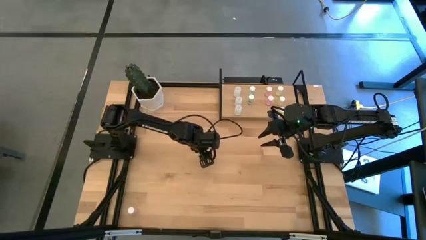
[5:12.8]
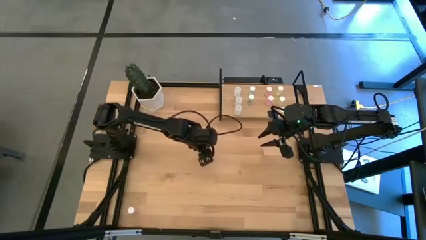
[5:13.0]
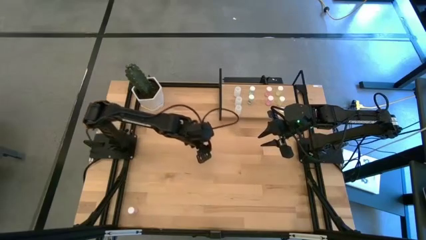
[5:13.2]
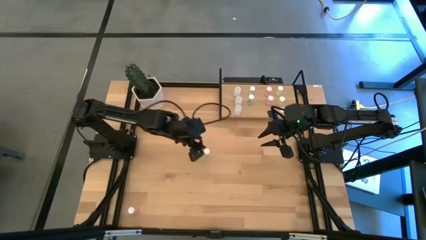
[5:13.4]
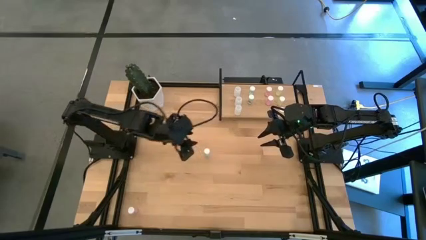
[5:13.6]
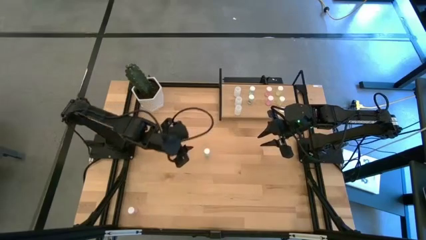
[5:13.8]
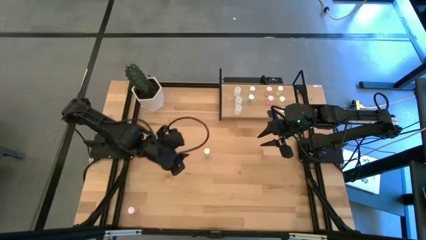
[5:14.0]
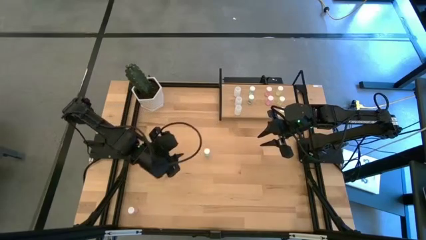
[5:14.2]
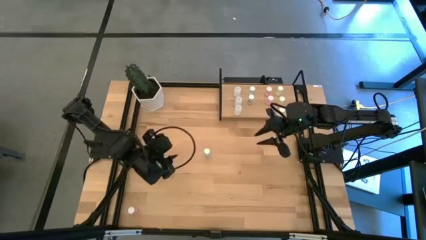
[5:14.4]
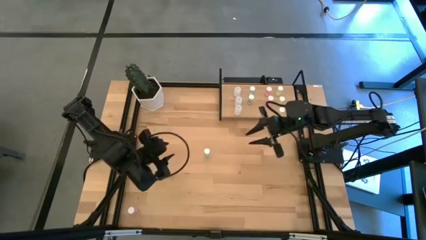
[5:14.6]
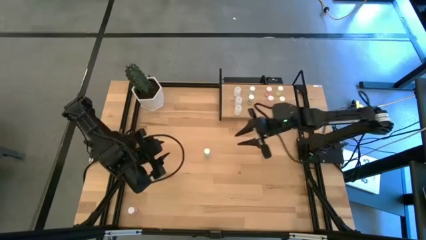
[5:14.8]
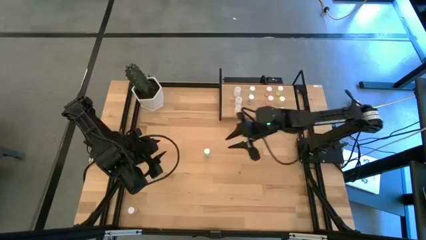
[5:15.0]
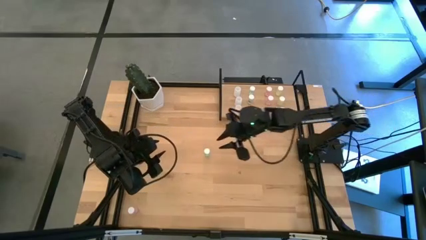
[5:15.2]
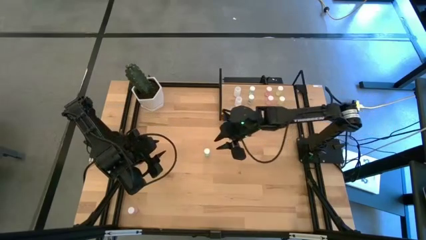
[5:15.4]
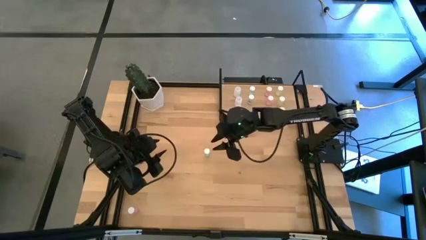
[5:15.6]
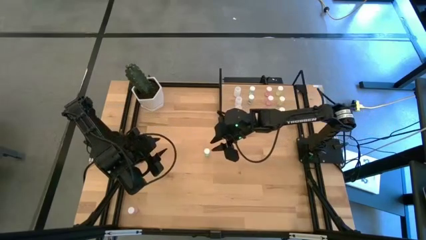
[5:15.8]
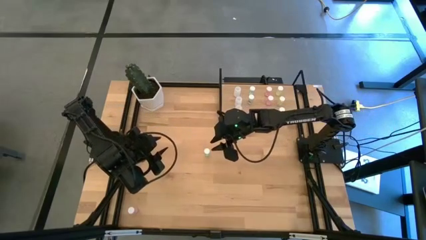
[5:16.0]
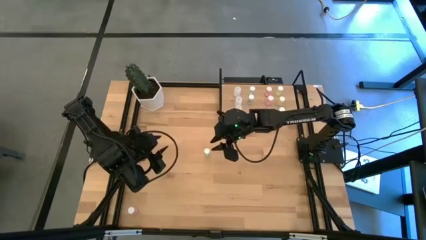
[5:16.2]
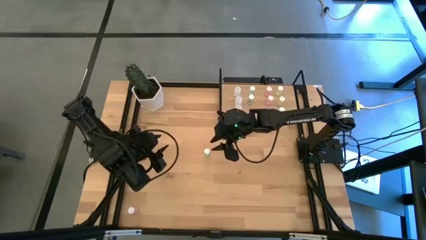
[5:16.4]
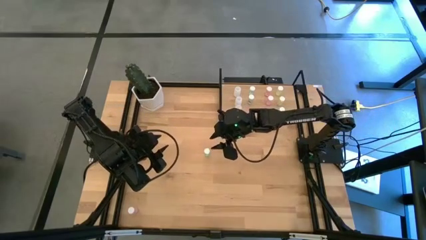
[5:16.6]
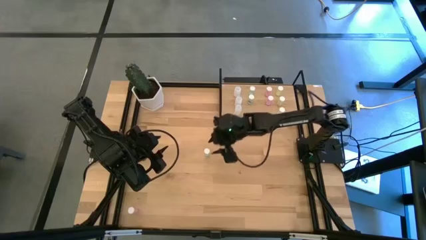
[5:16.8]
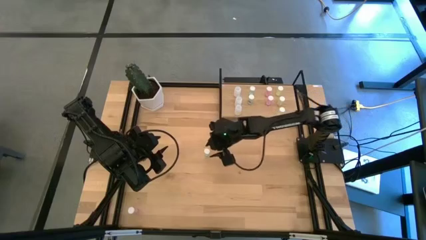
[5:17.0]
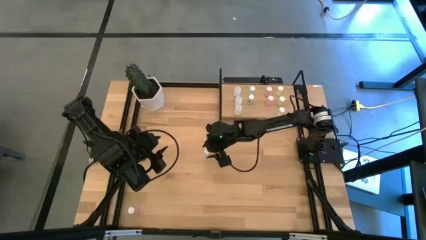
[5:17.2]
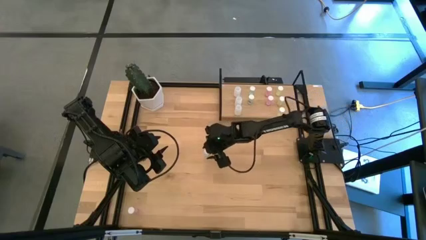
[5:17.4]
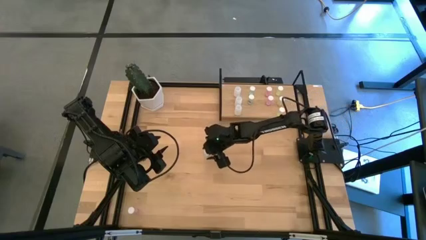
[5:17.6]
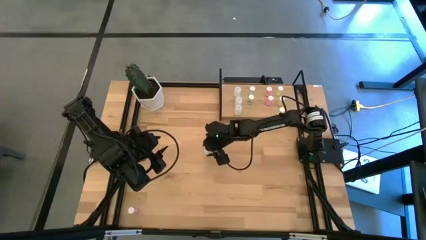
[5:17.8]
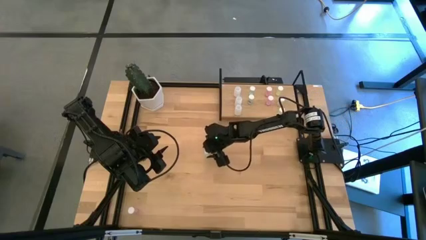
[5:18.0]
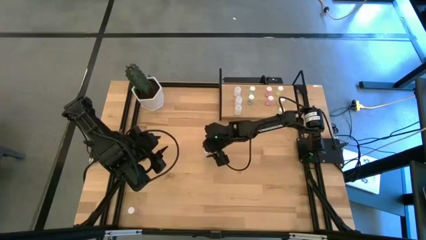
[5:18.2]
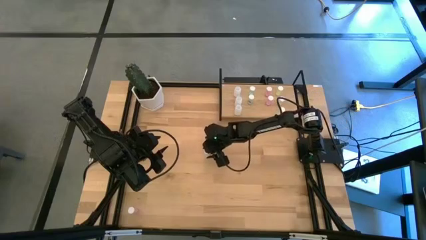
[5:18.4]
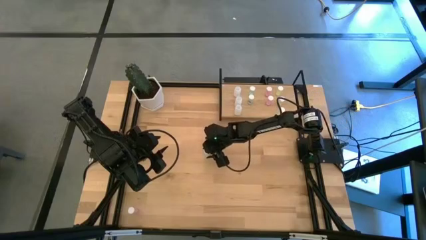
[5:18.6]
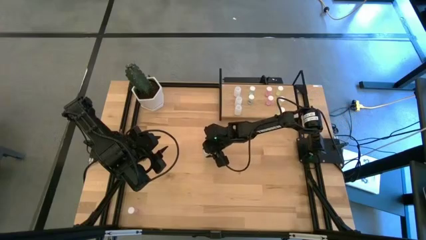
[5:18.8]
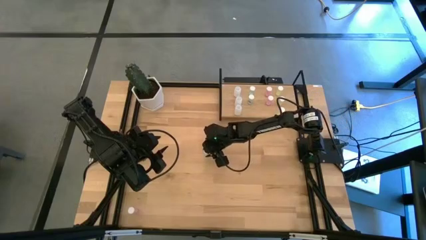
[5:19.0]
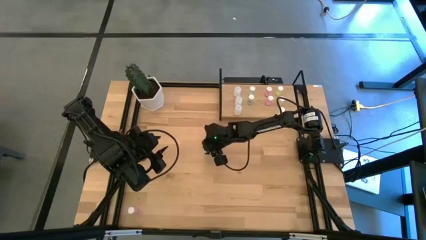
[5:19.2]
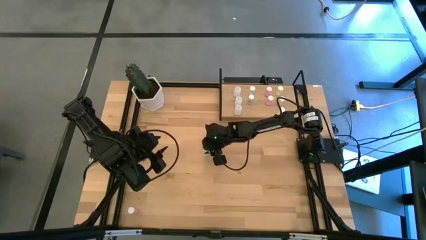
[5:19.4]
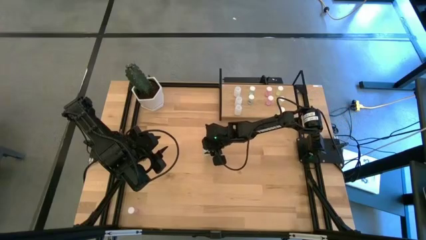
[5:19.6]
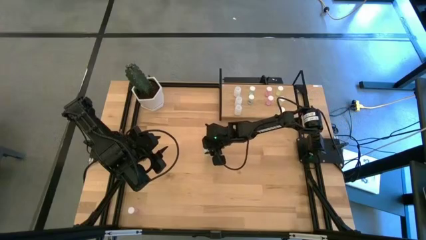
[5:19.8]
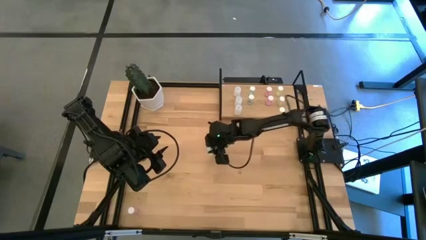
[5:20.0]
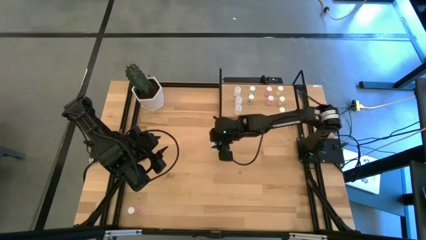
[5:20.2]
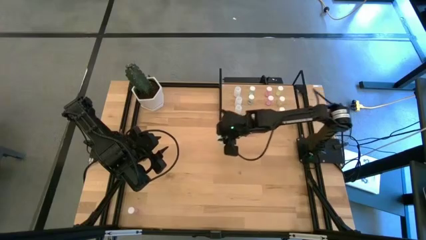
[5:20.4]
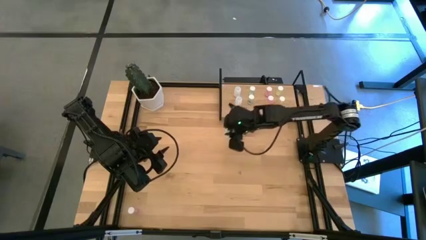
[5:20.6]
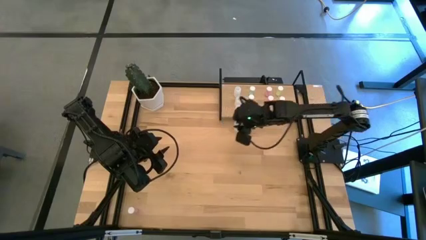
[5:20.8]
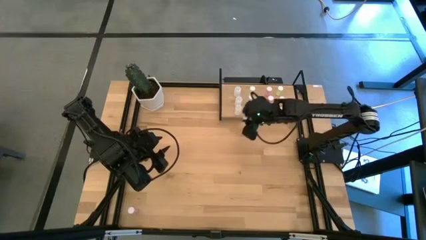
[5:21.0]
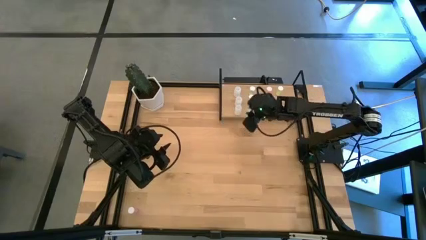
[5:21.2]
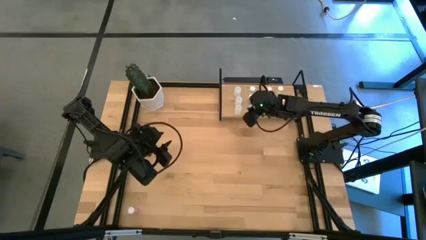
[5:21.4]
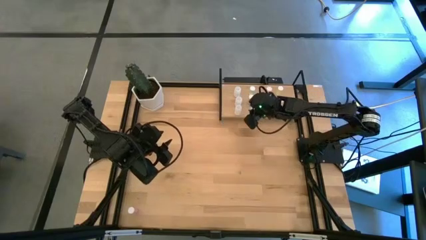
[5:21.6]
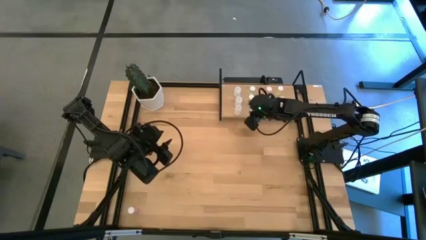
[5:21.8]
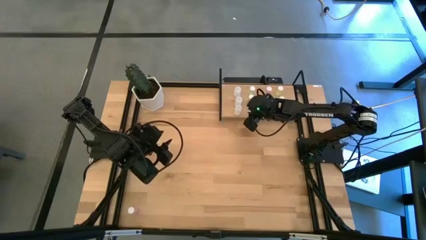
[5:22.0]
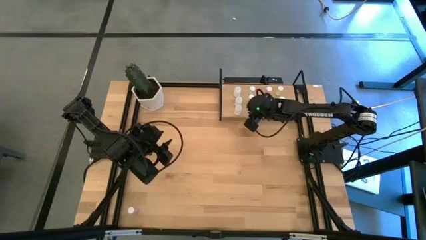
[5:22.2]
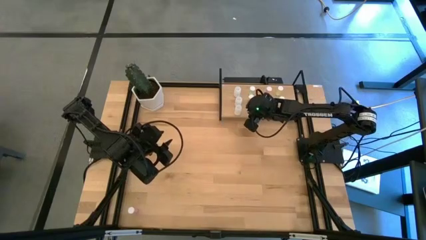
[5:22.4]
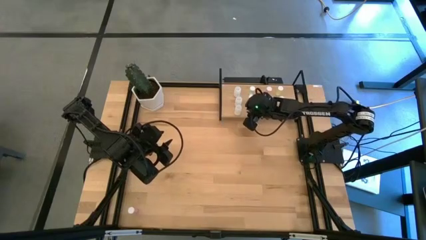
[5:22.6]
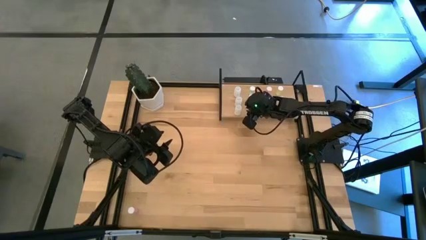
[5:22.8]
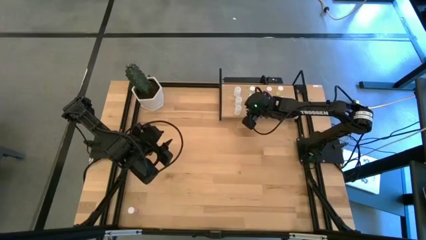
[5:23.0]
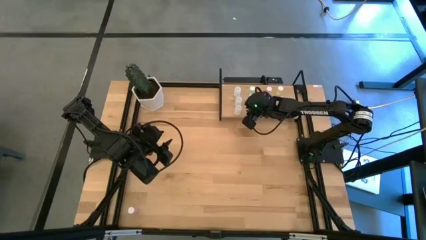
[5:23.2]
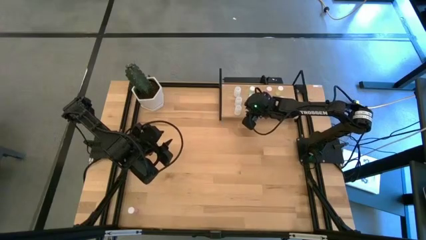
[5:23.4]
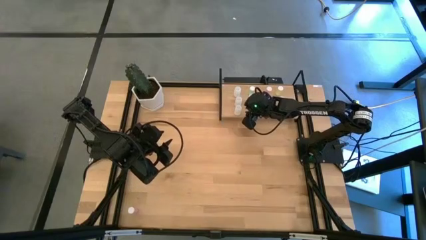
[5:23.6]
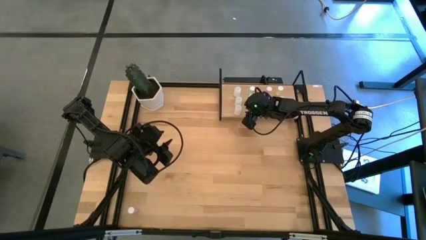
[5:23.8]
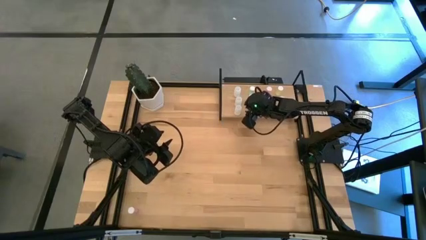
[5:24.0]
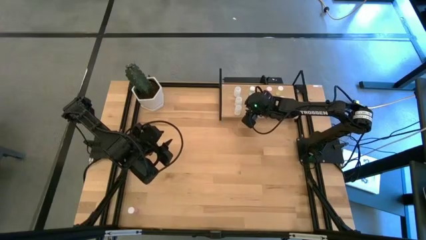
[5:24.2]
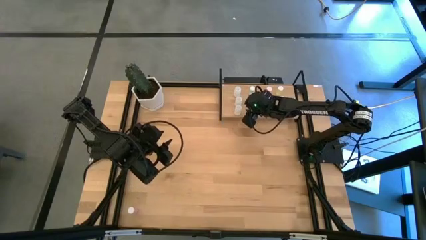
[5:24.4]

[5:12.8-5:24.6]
Task: Pick and place medicine bottles onto shelf by color
Put the green pill bottle on the shelf aligned with the other green pill bottles

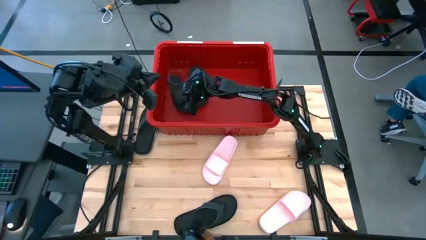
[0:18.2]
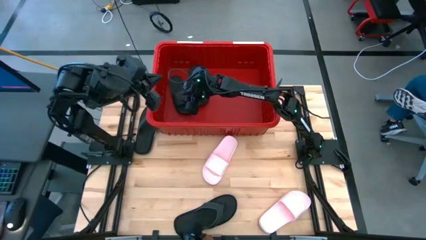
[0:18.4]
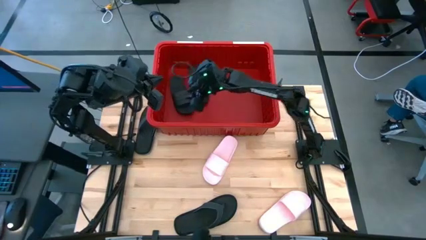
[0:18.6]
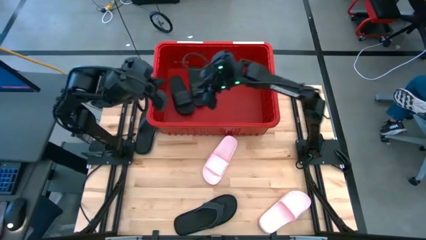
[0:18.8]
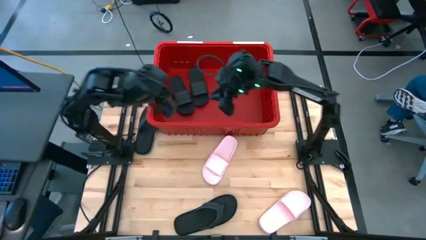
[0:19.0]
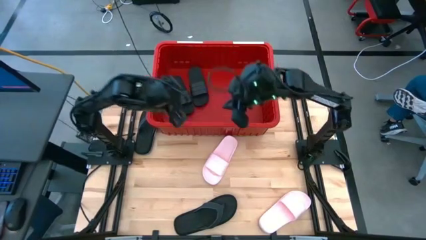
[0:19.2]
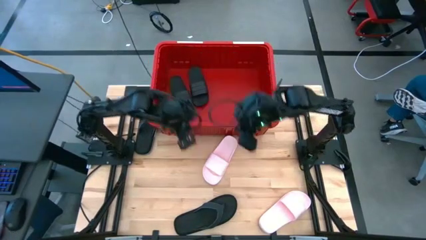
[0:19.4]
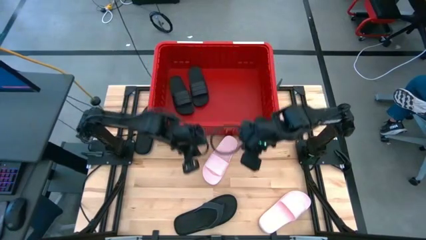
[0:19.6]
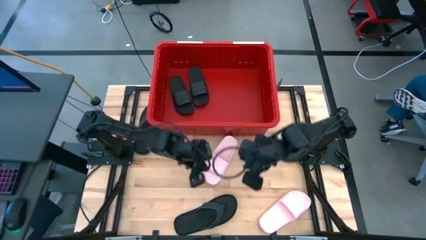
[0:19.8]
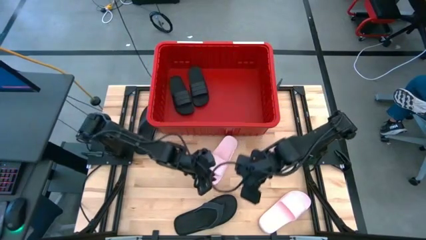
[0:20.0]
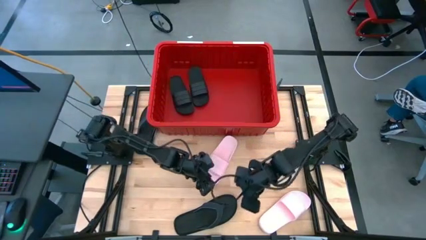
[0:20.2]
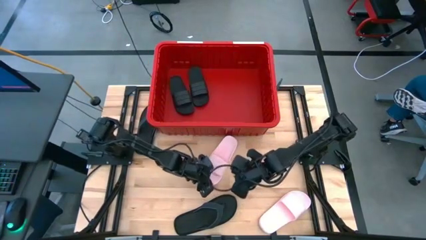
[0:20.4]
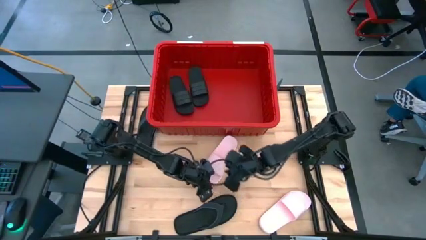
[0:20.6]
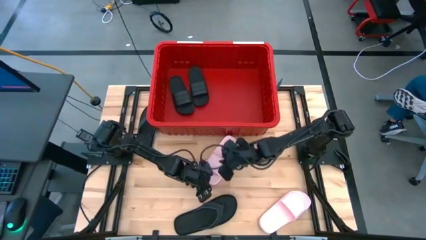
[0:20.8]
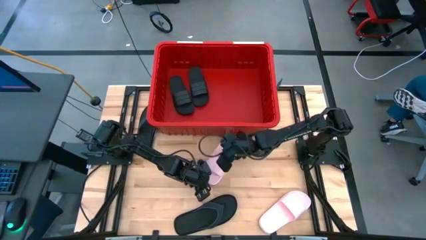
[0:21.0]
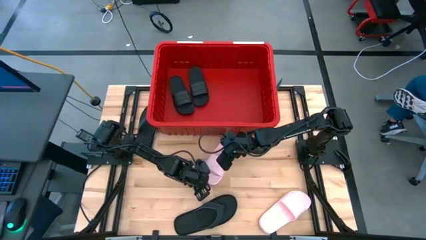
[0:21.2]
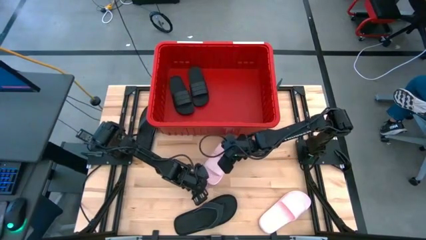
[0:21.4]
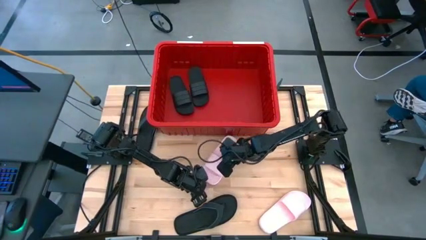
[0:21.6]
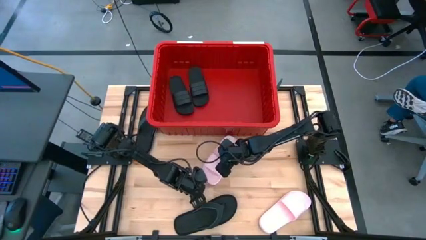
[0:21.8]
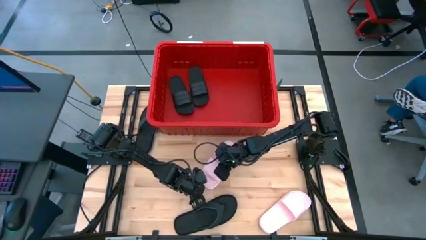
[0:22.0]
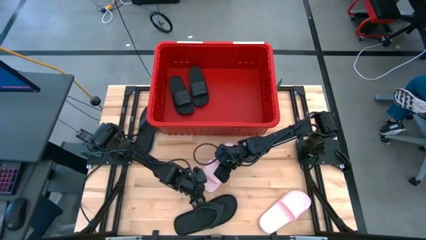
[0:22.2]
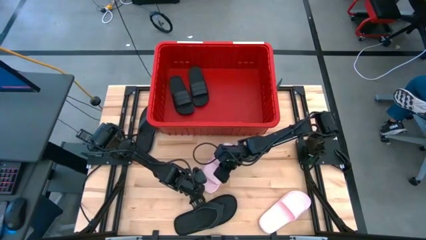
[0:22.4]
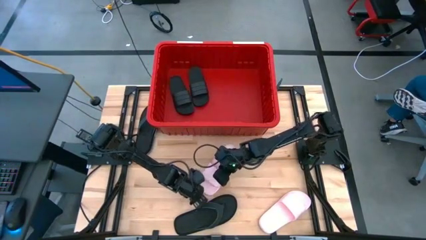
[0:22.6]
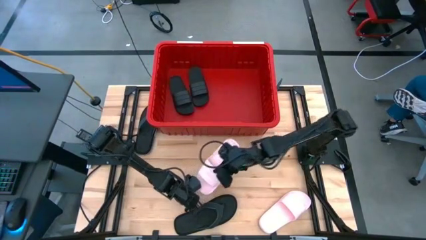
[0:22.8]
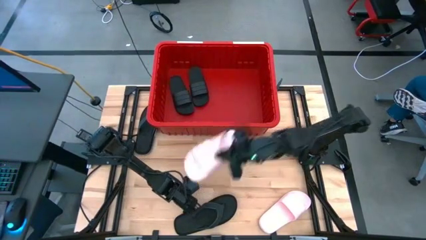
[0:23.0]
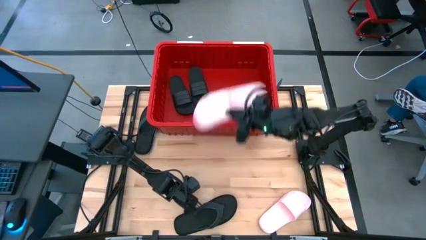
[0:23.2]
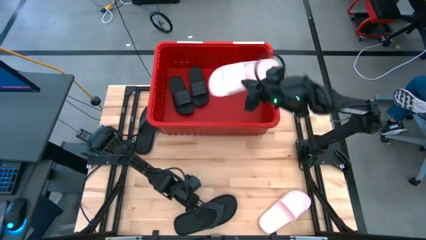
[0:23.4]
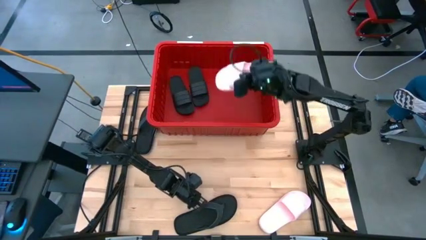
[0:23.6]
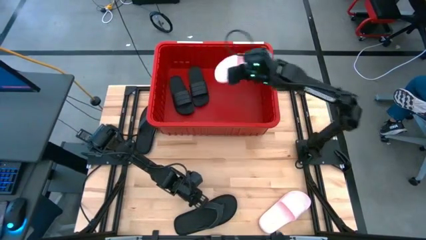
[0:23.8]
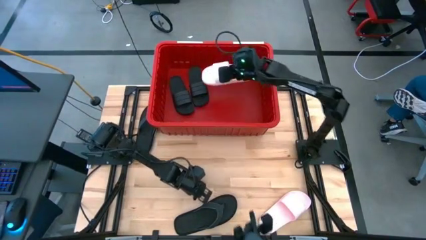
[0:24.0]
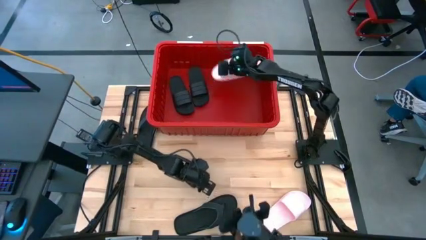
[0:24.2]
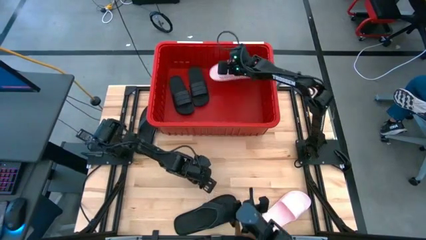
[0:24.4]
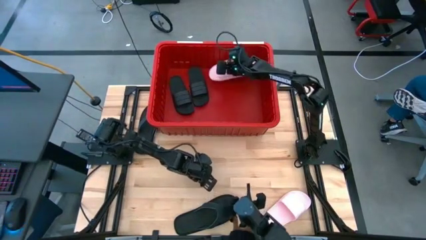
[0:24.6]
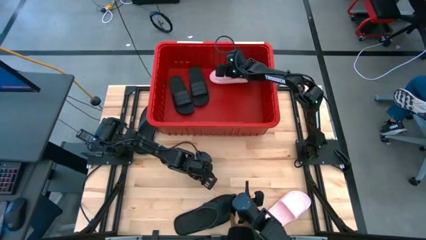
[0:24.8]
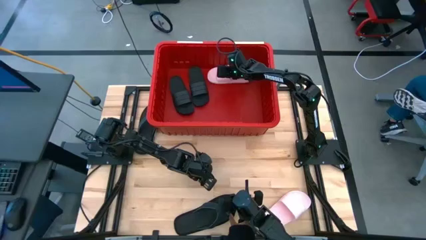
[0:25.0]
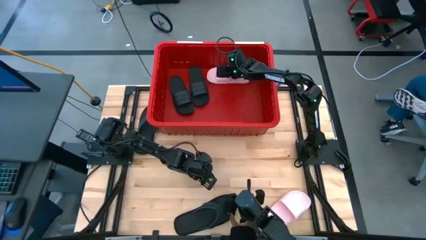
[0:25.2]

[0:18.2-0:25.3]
Task: Pick and place slides into bin
Put the left pink slide in the red bin
